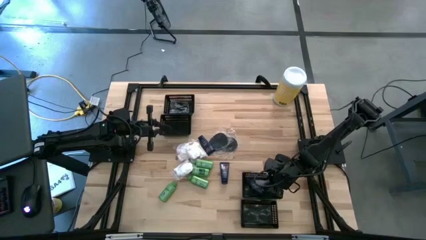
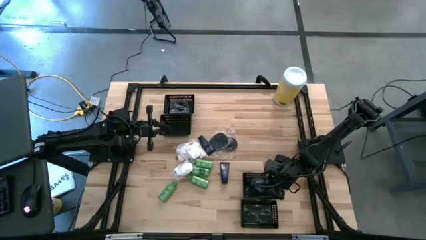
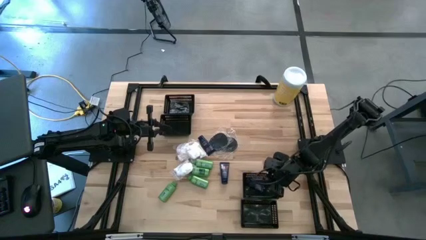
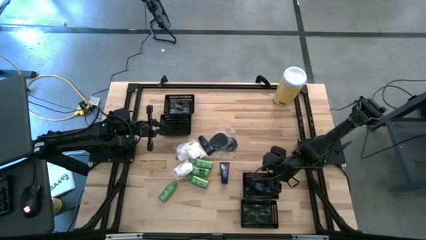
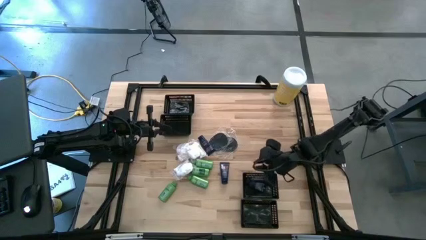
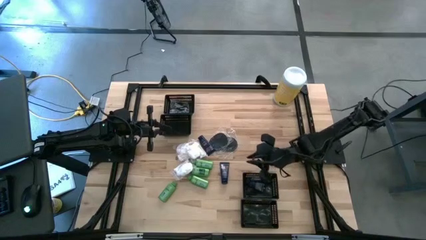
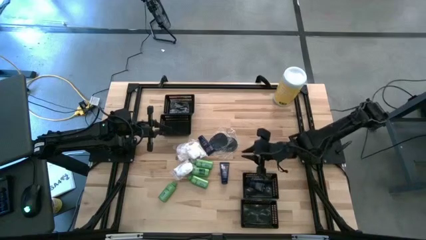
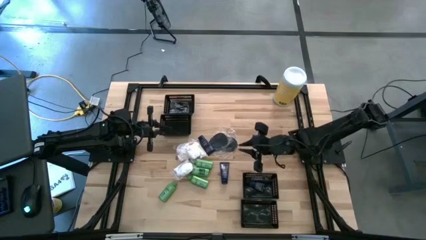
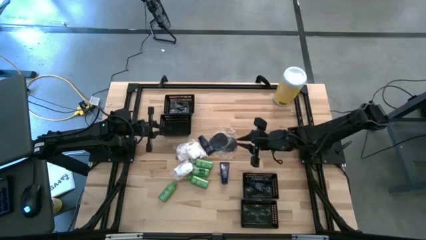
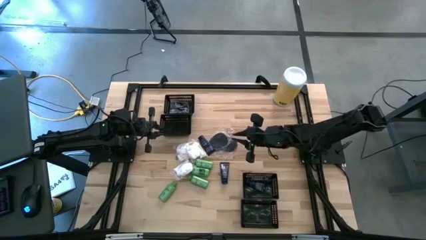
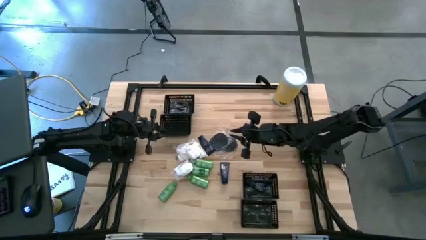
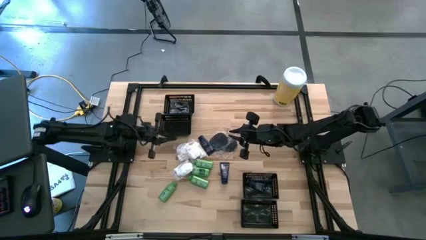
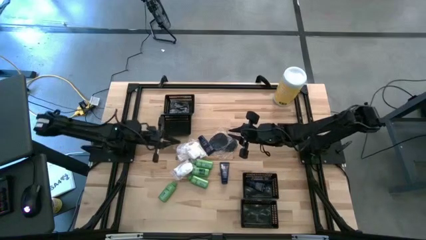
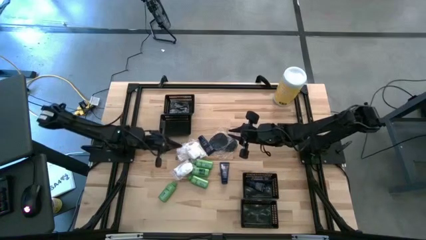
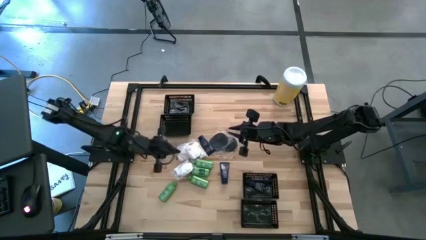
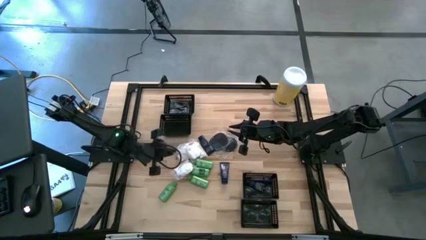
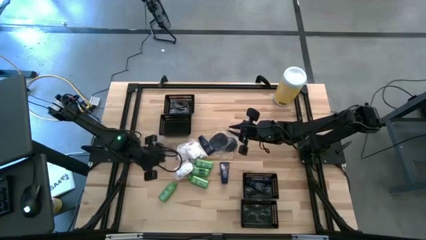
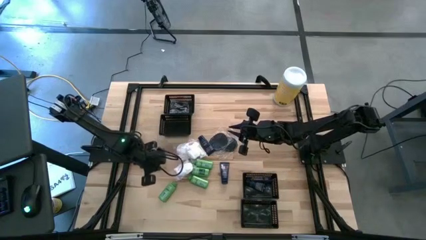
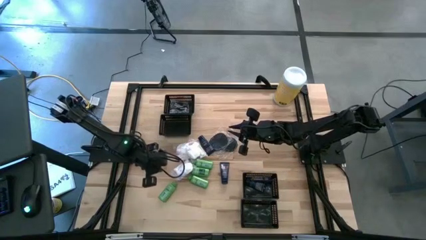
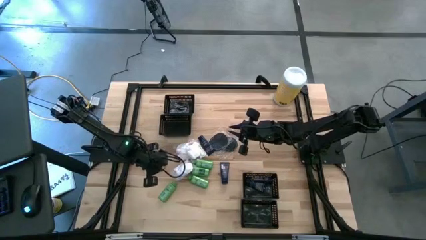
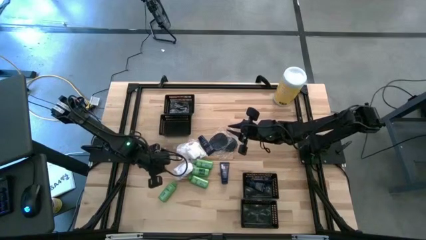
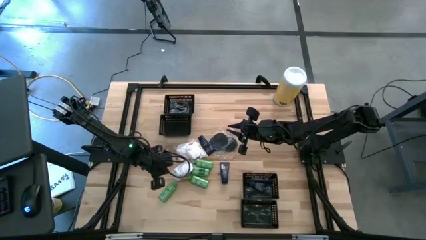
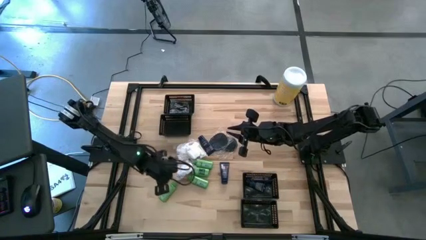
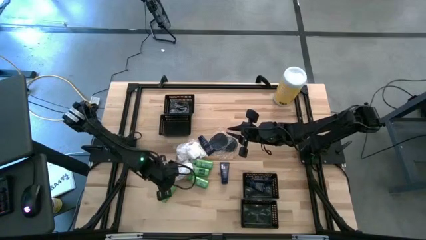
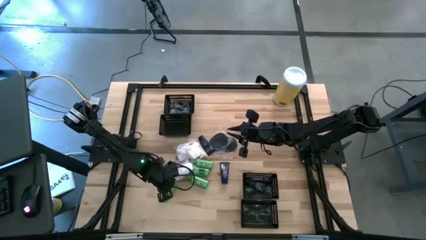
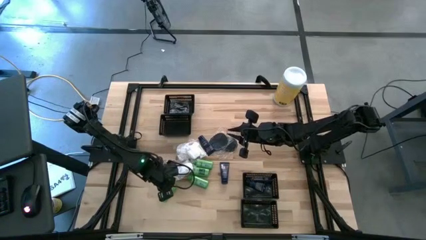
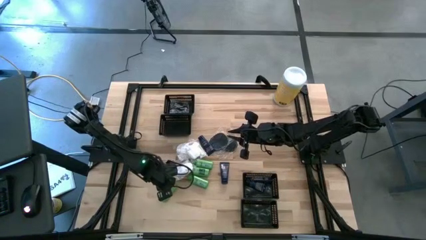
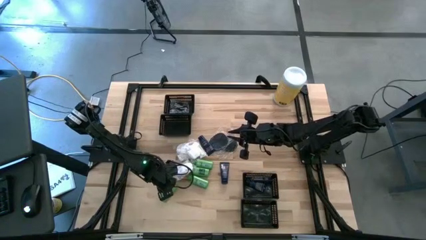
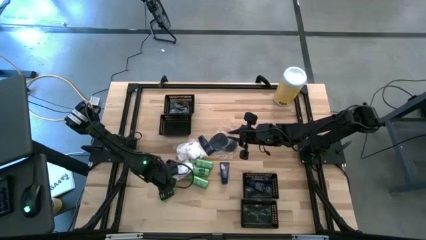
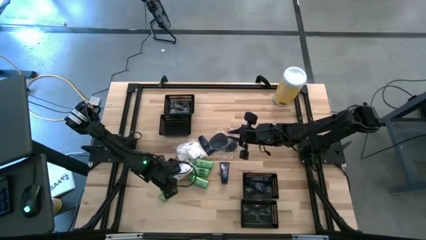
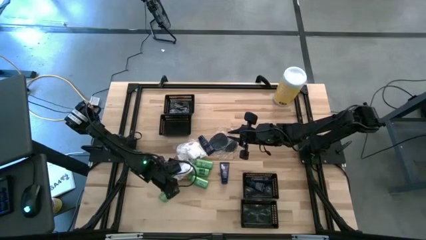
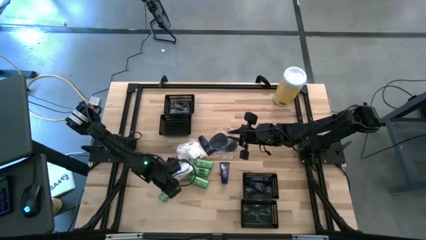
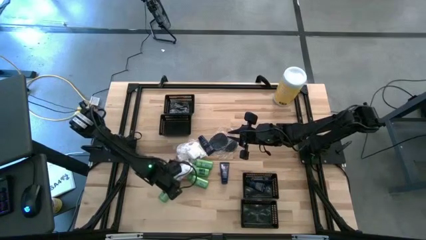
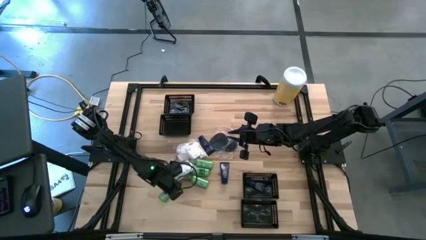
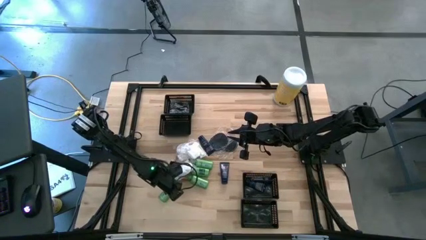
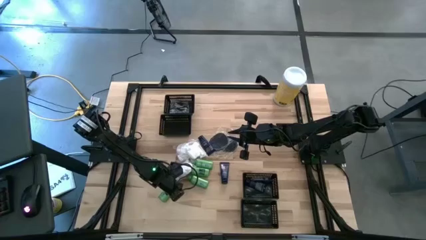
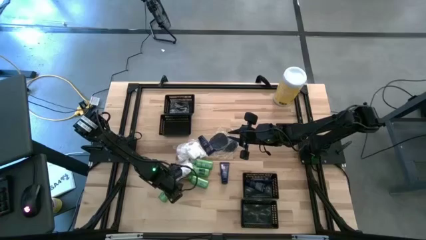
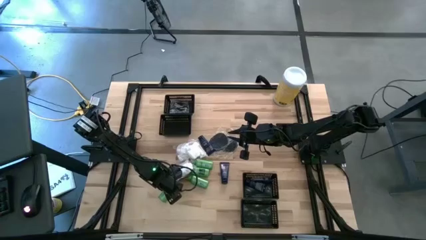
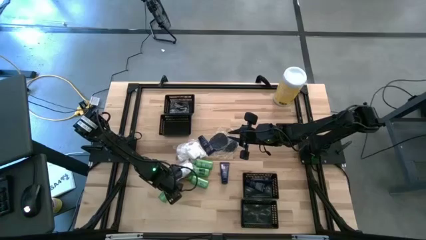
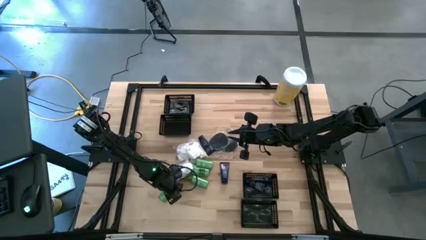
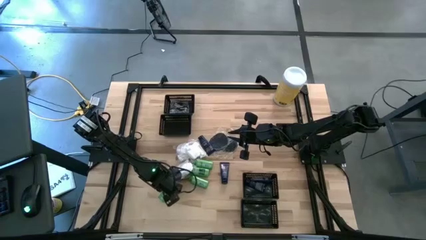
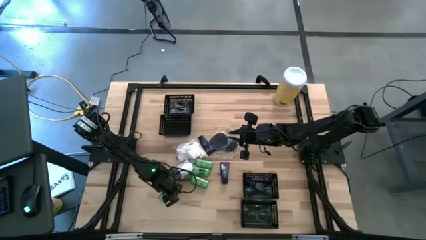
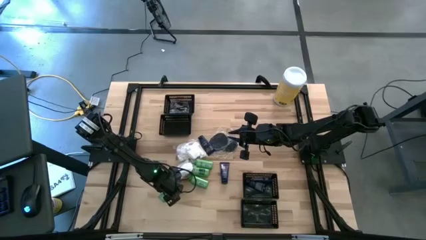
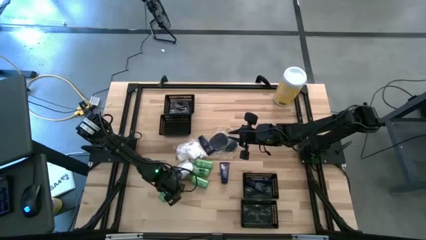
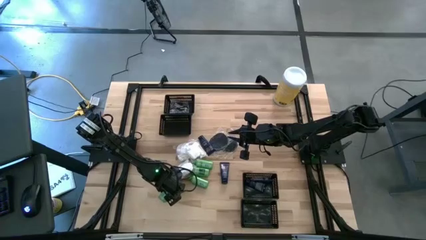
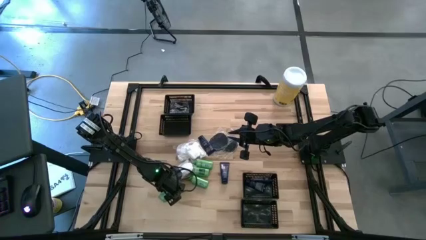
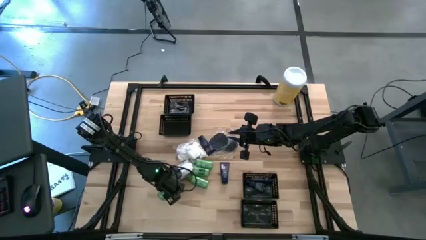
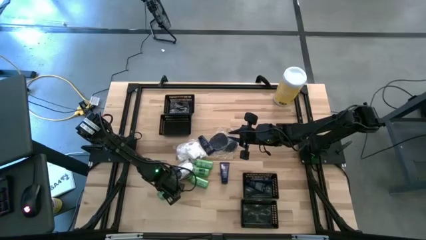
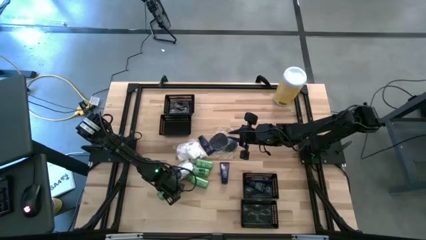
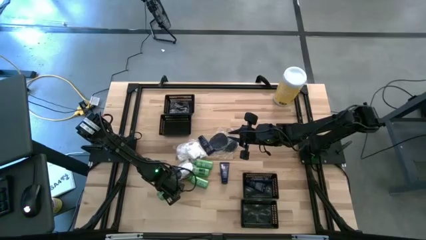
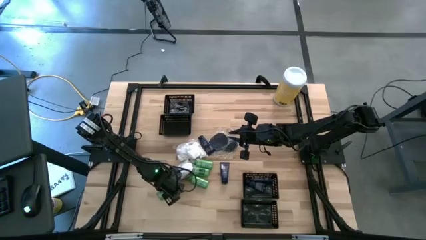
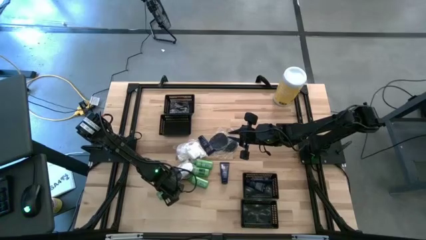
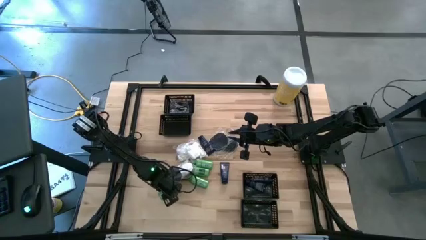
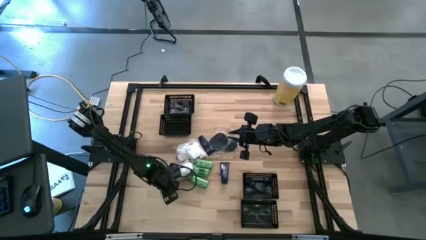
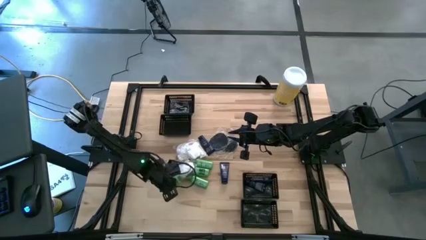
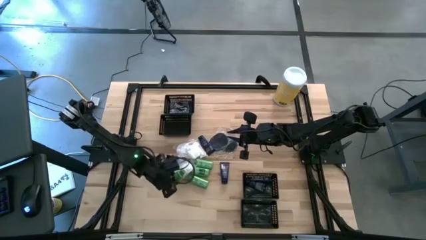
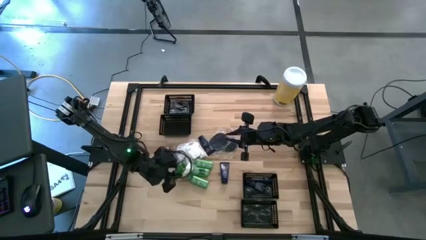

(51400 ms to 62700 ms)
Task: Pick & Place Travel size toiletries
Put the green shampoo into the bottom black basket
